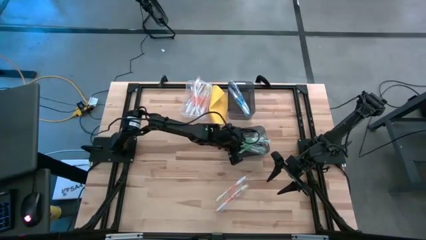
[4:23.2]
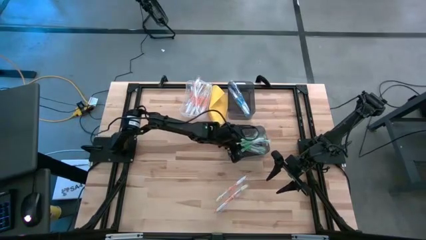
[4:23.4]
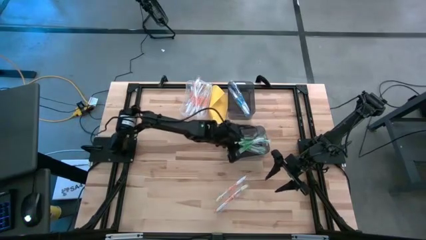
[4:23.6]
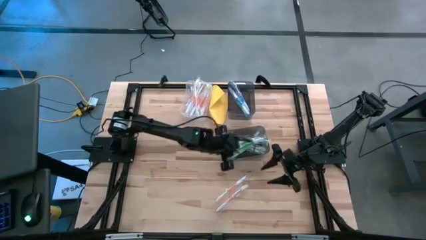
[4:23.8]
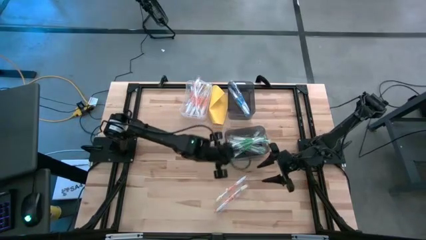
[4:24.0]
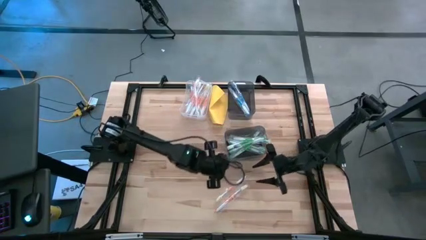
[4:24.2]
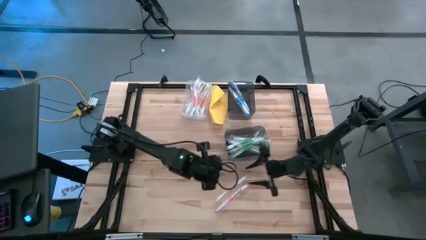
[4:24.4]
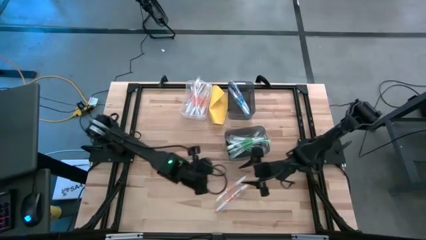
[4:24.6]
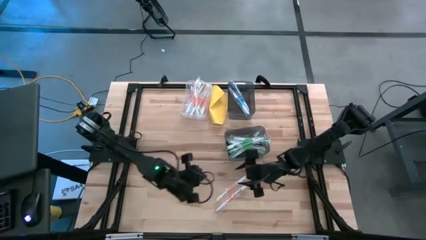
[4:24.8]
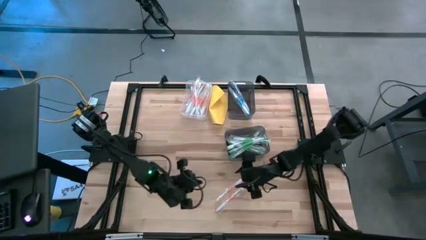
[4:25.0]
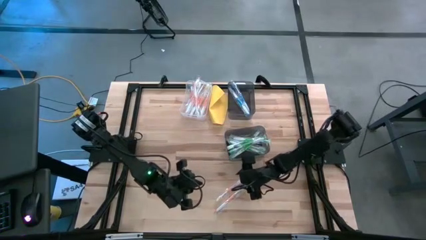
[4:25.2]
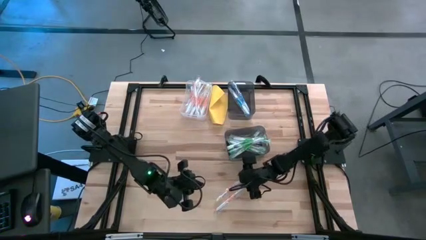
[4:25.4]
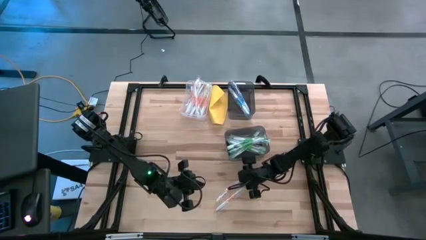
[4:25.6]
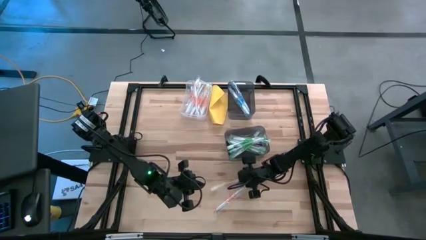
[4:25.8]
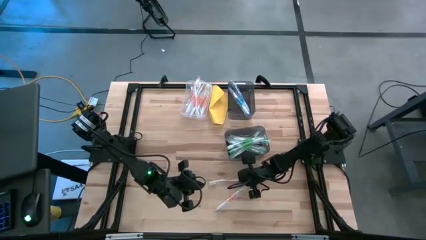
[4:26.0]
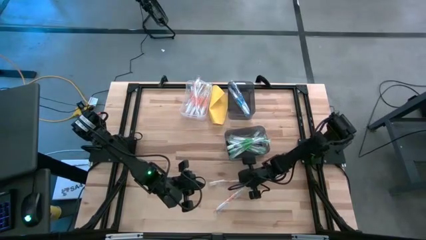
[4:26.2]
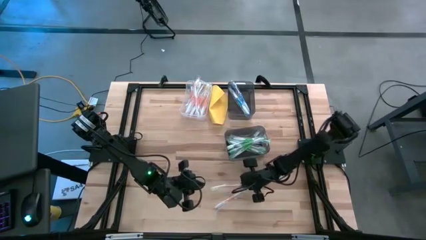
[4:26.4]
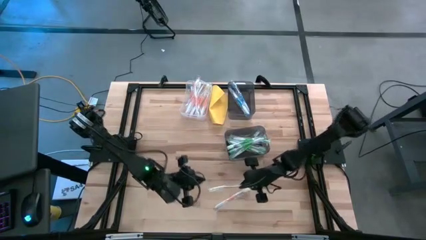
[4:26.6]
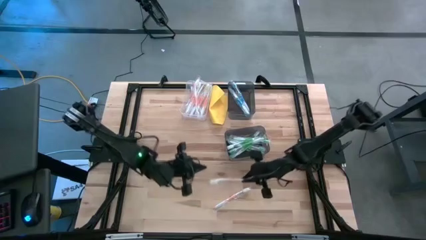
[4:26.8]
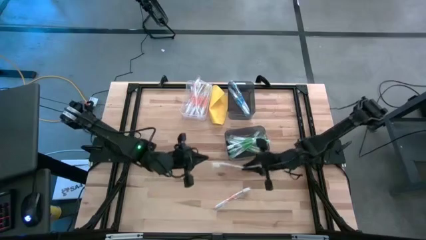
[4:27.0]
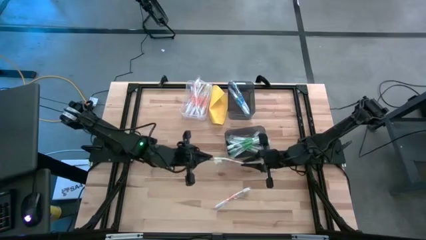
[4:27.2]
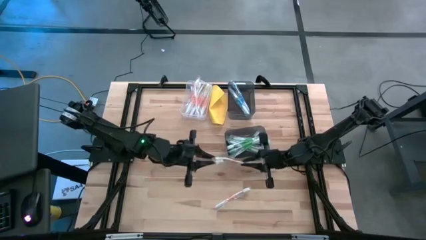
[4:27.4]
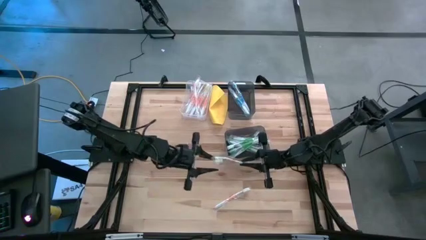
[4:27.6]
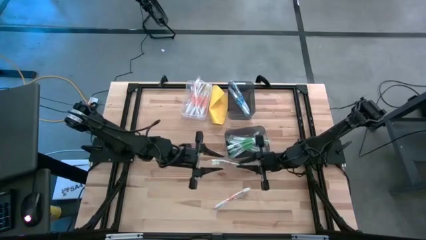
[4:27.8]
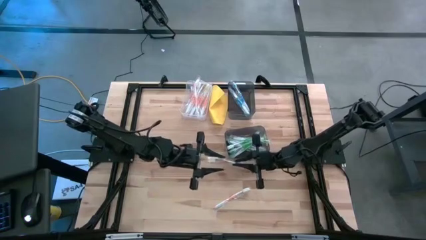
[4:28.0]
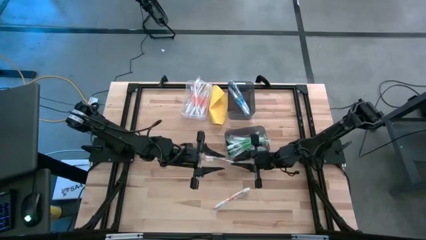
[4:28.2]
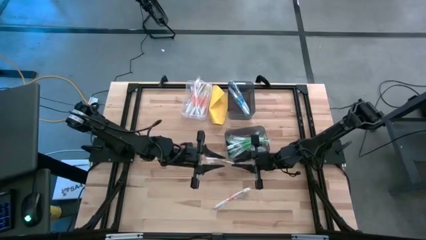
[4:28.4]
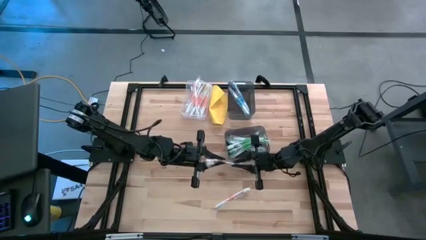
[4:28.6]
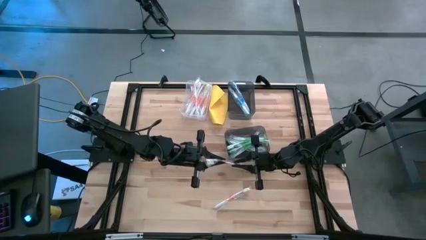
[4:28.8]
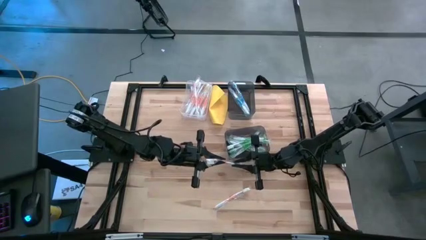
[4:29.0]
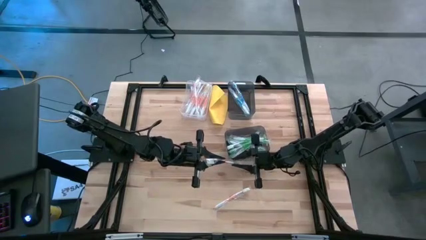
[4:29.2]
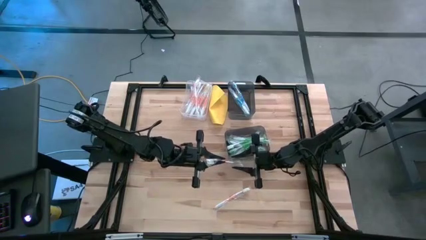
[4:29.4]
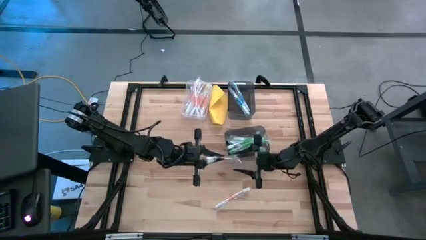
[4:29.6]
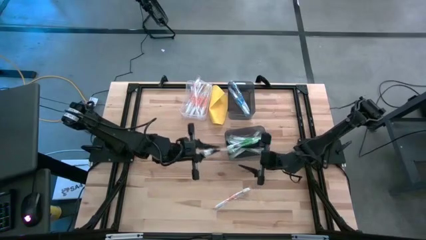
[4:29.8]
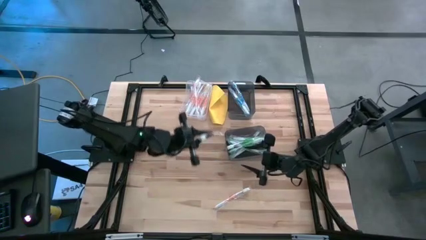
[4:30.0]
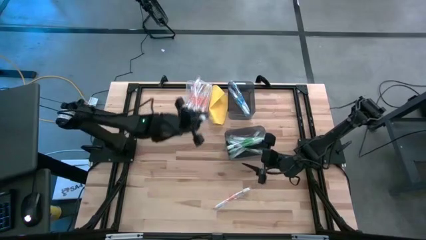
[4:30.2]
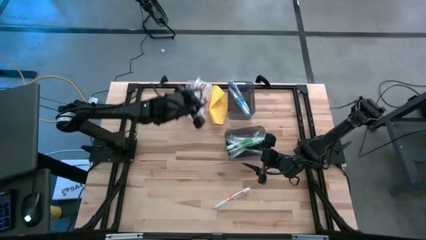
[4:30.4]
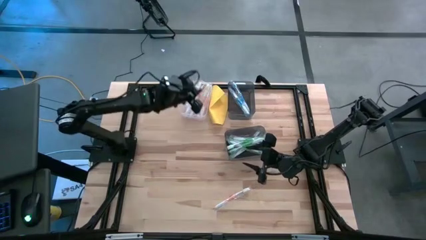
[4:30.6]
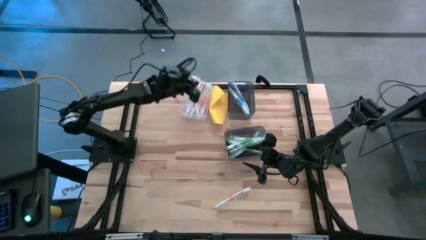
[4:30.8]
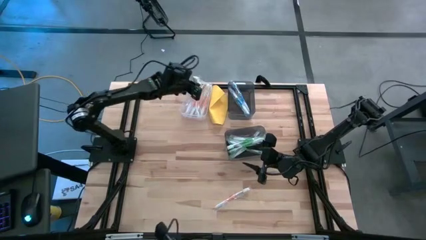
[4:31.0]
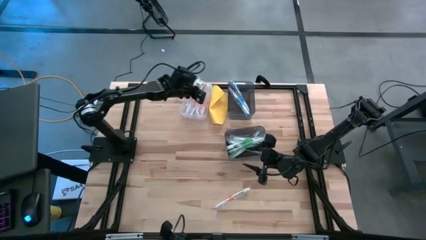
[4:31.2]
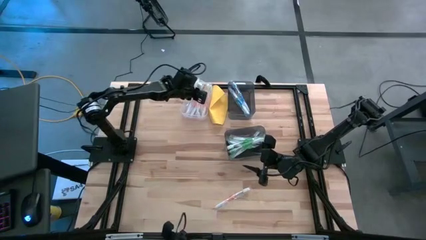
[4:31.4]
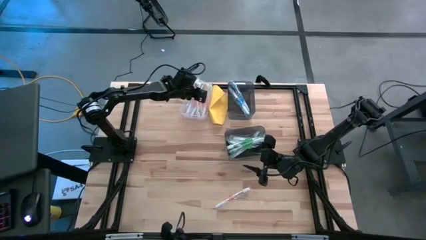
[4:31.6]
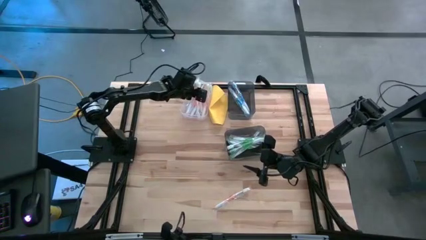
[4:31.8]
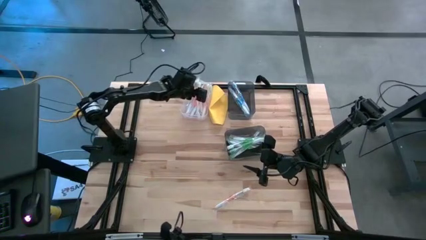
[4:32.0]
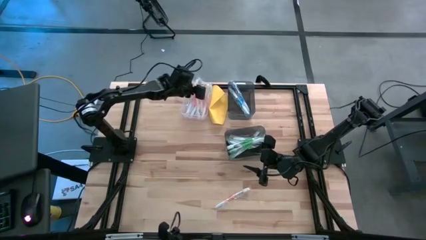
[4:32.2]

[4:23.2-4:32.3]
Task: Pick & Place Toothbrushes
Put the orange toothbrush into the transparent bin

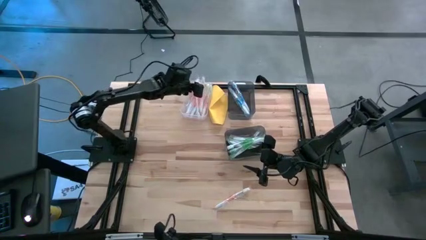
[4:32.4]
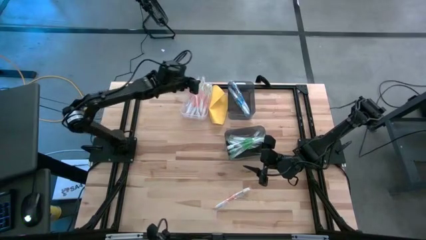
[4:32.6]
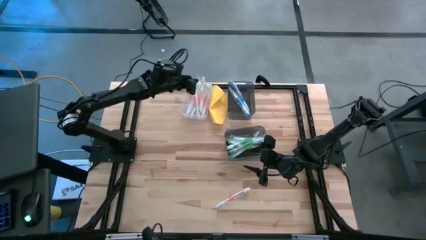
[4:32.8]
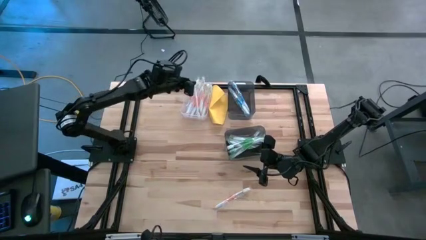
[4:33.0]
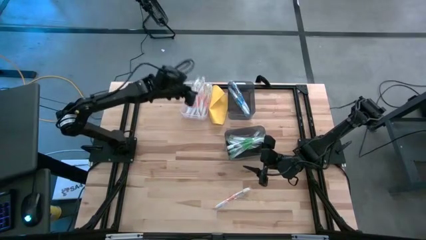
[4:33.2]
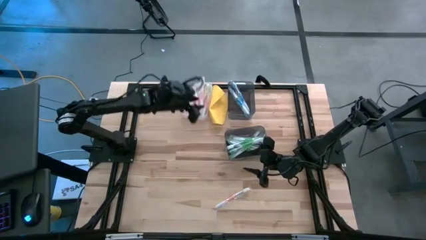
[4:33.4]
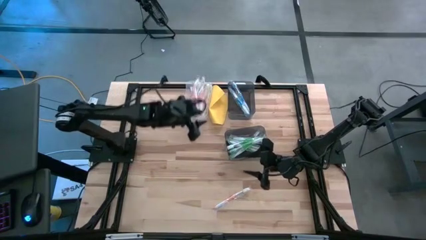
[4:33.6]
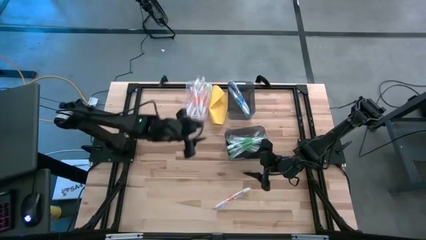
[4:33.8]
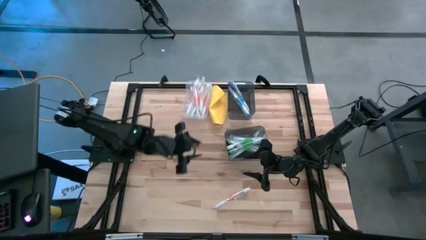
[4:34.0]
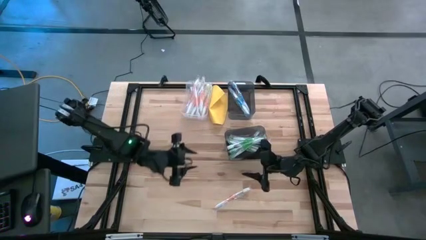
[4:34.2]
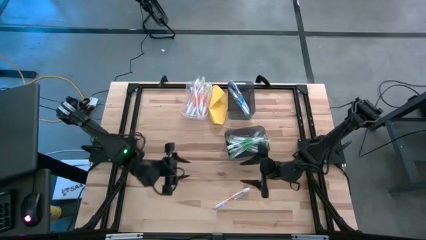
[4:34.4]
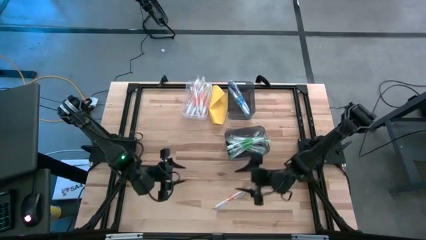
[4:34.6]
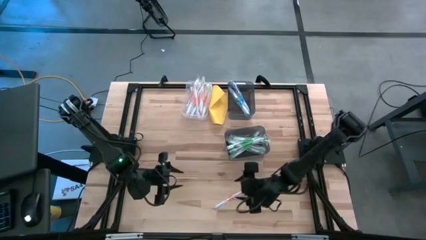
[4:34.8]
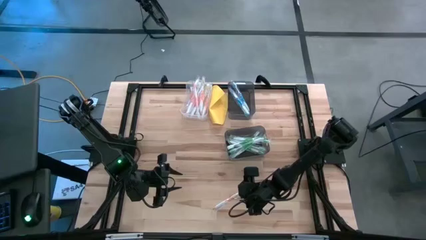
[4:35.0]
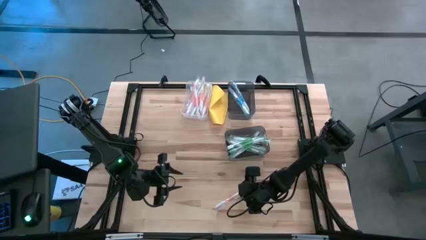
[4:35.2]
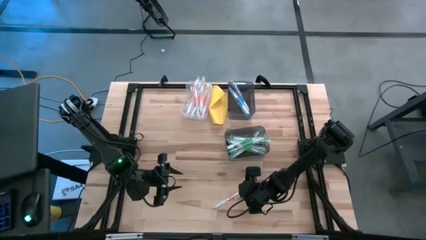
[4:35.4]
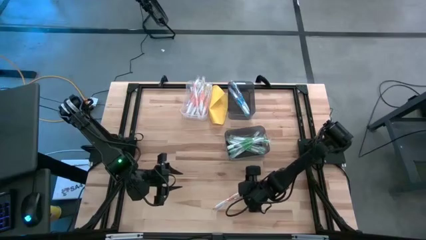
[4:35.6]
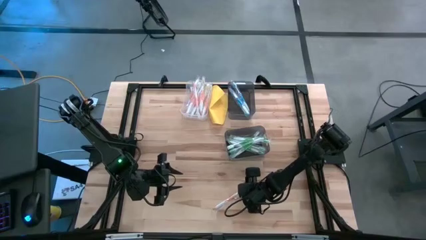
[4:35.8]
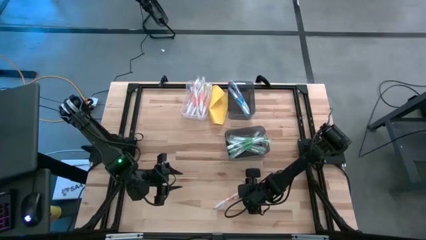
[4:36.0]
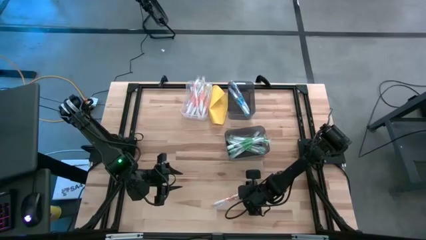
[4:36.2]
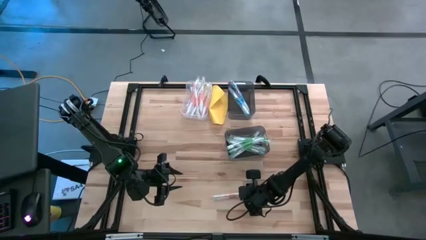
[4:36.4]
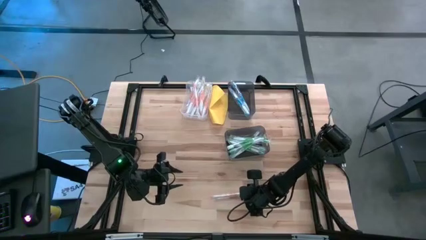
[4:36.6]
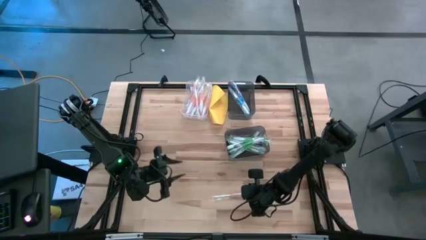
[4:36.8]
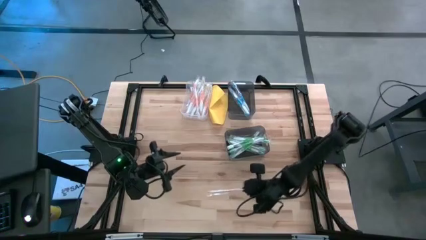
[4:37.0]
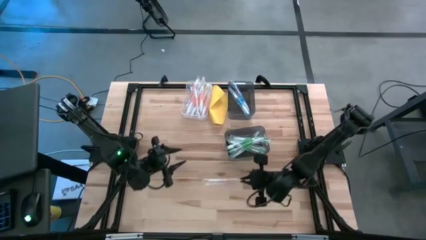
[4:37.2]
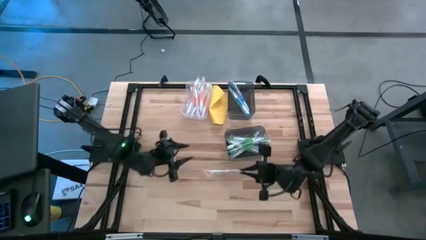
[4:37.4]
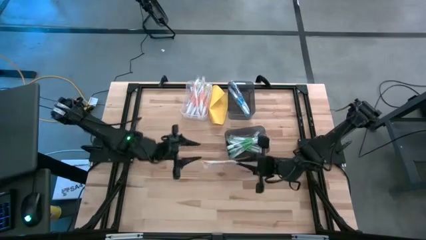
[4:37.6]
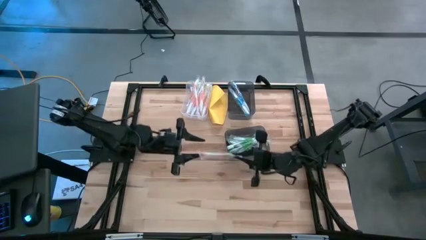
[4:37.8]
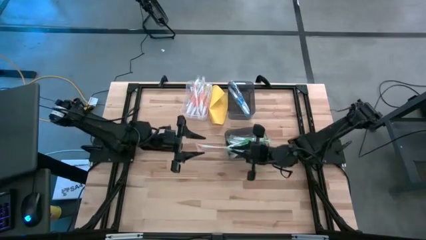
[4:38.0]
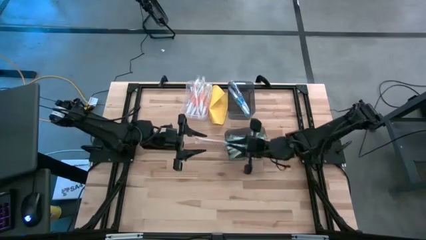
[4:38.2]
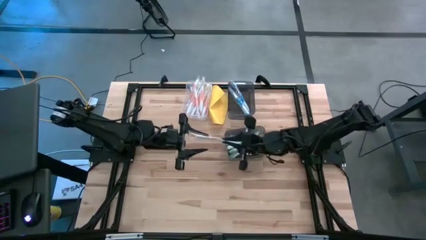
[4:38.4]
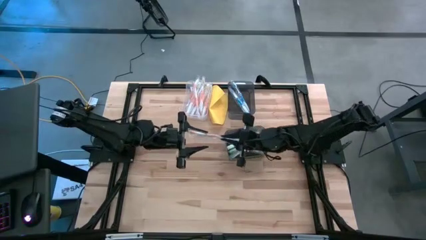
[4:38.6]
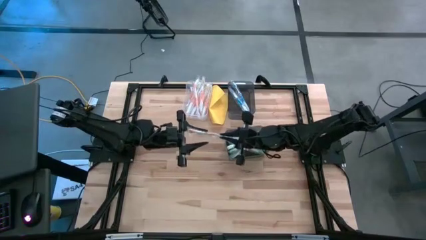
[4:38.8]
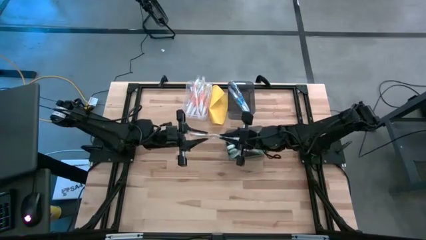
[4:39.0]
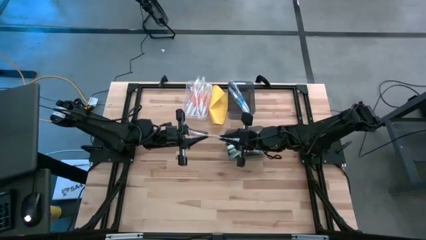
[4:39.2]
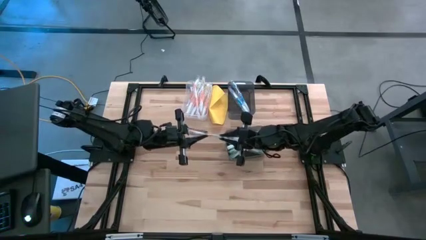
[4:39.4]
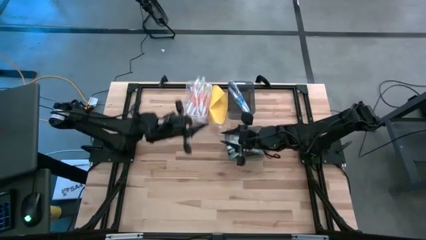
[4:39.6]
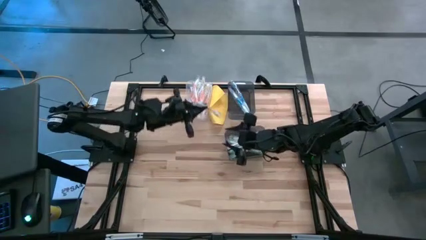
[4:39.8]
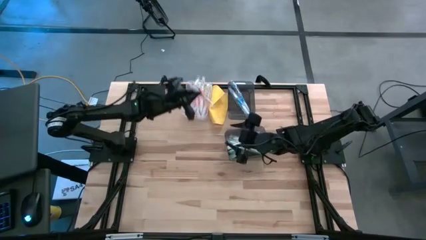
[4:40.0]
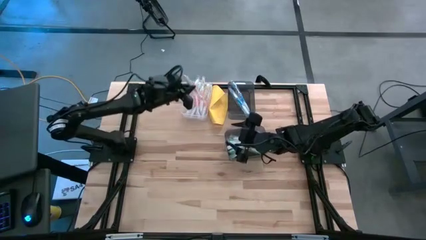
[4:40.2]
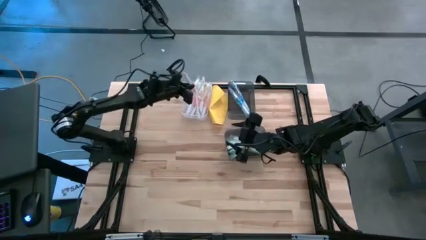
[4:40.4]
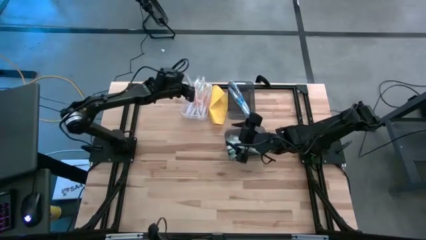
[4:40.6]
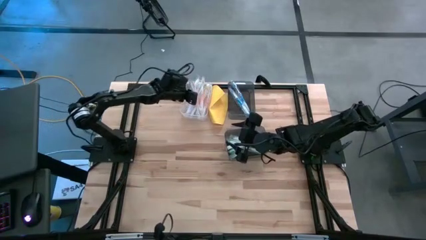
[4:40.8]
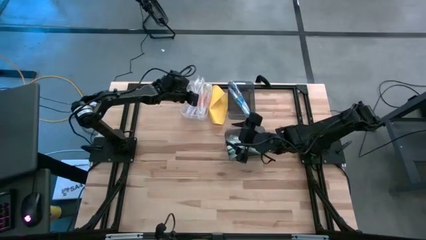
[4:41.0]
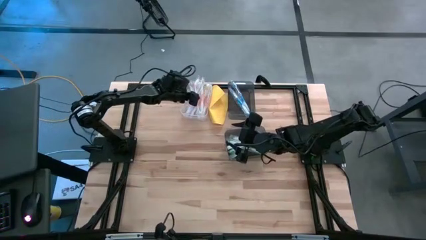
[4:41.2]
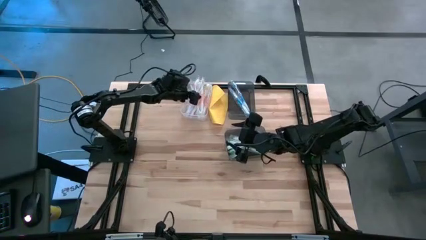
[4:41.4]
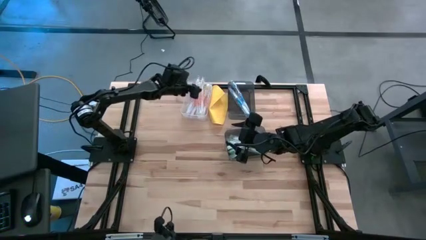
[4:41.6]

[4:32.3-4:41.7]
Put the orange toothbrush into the transparent bin
